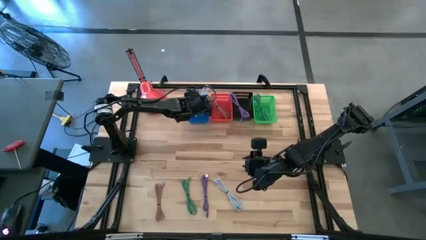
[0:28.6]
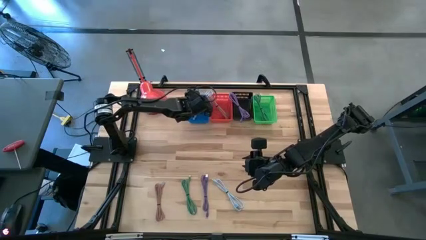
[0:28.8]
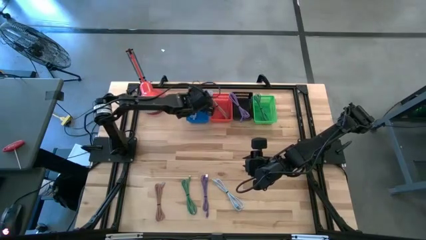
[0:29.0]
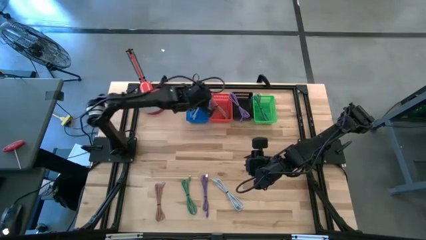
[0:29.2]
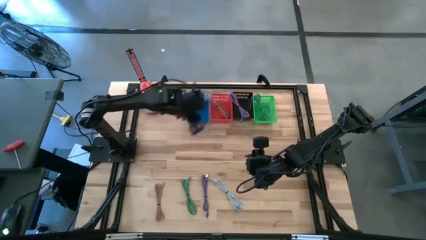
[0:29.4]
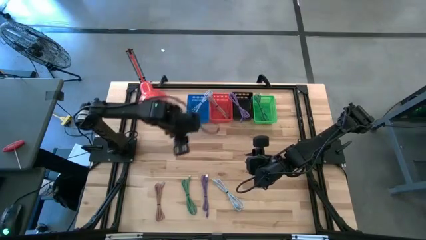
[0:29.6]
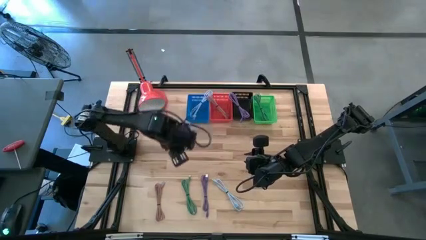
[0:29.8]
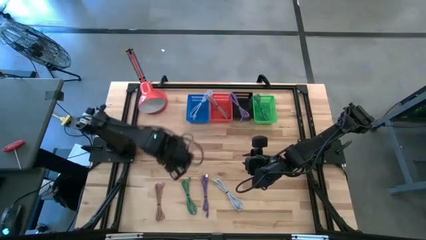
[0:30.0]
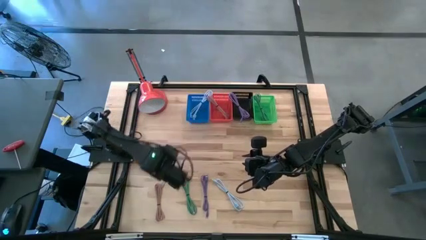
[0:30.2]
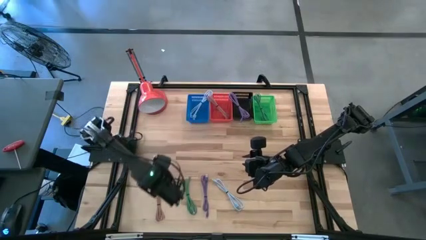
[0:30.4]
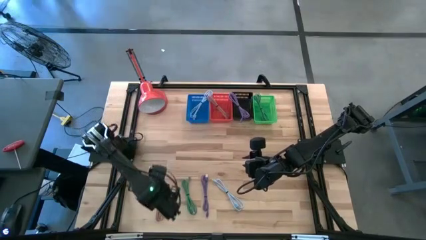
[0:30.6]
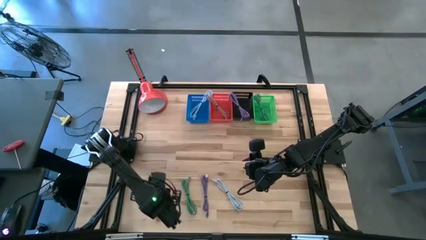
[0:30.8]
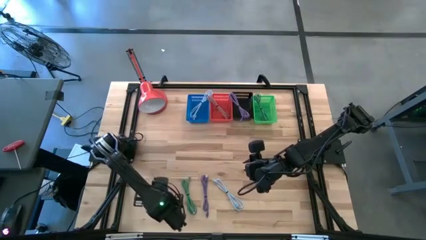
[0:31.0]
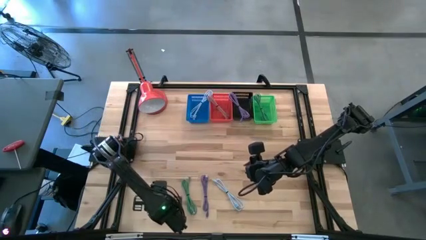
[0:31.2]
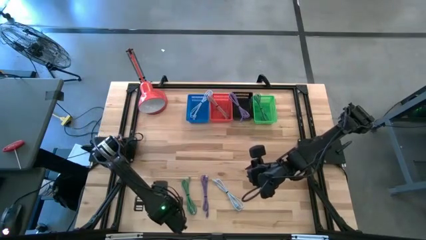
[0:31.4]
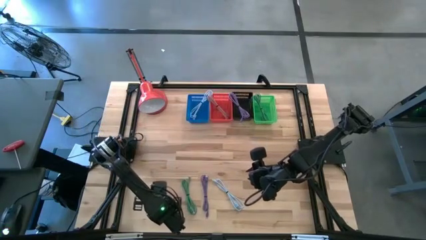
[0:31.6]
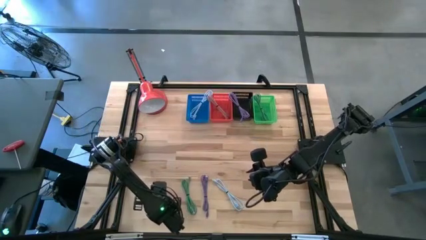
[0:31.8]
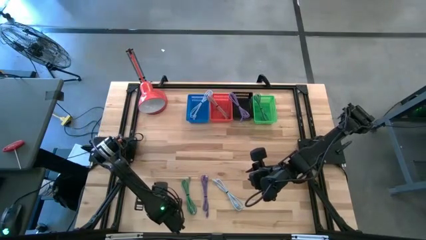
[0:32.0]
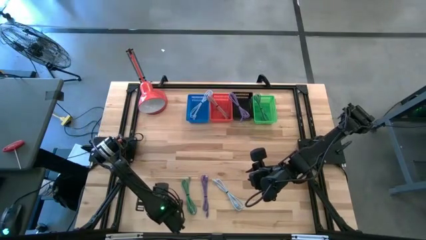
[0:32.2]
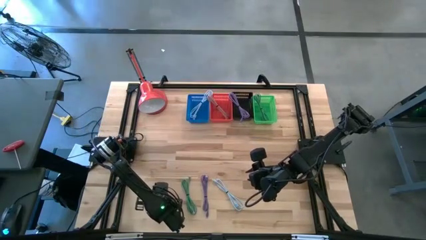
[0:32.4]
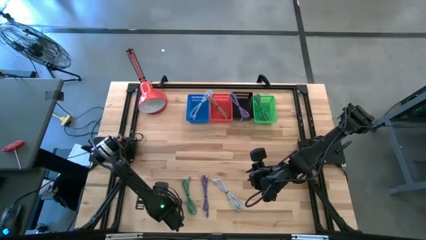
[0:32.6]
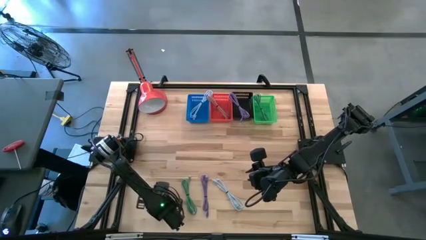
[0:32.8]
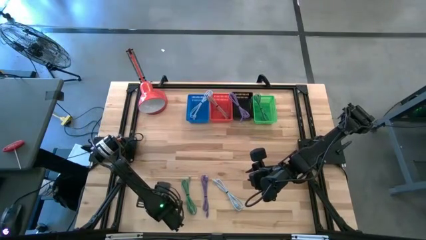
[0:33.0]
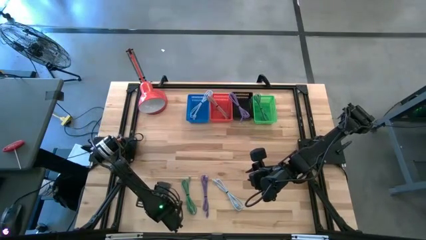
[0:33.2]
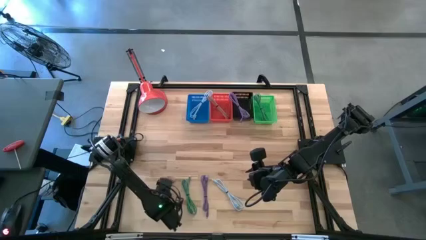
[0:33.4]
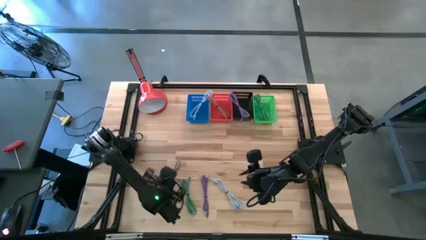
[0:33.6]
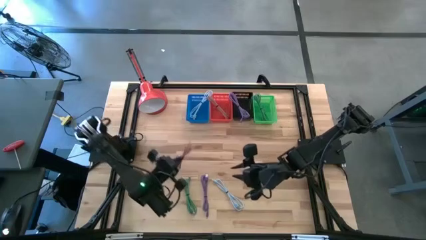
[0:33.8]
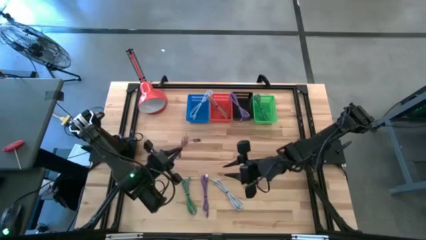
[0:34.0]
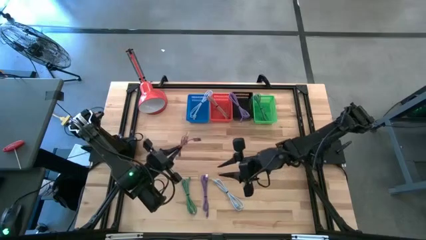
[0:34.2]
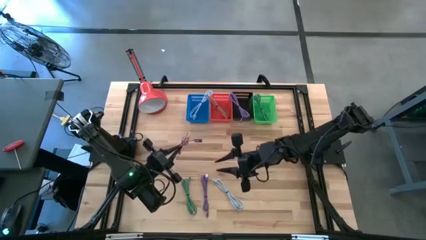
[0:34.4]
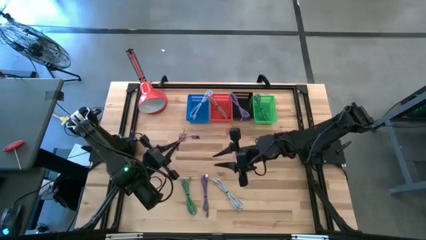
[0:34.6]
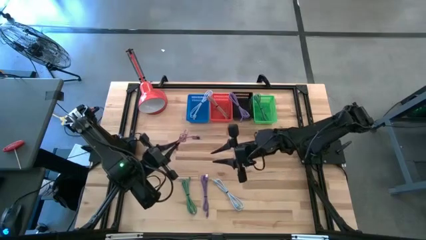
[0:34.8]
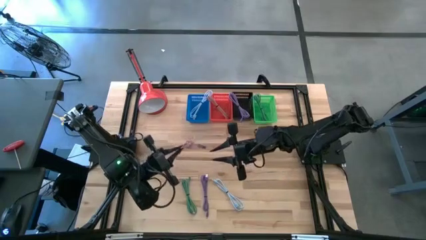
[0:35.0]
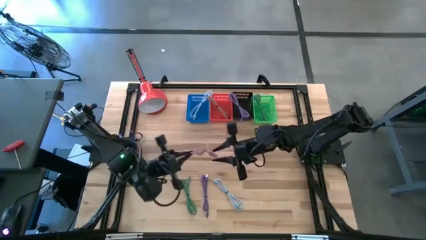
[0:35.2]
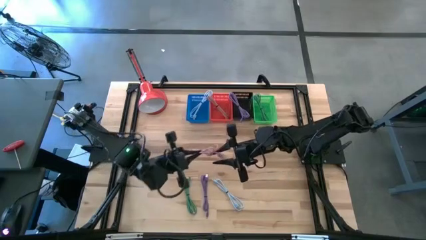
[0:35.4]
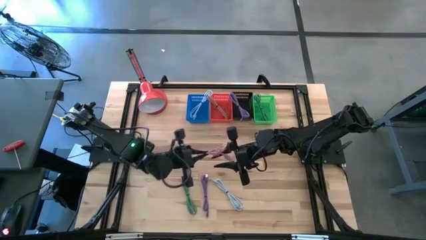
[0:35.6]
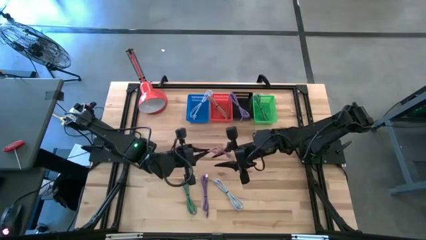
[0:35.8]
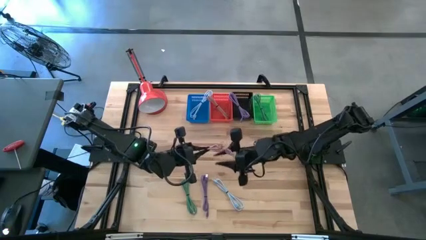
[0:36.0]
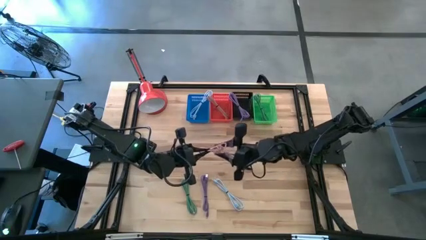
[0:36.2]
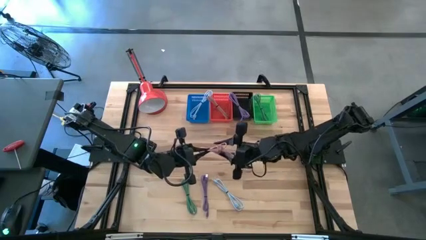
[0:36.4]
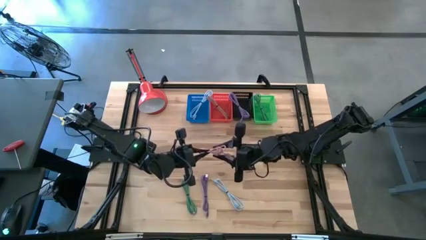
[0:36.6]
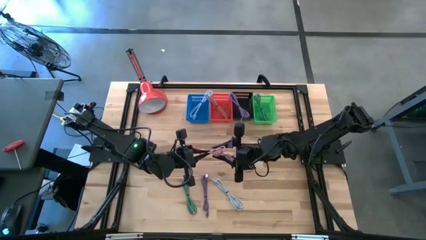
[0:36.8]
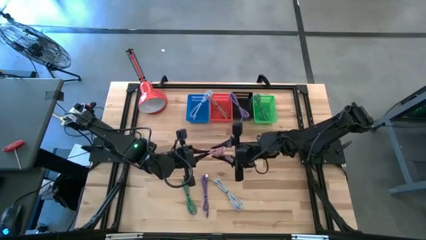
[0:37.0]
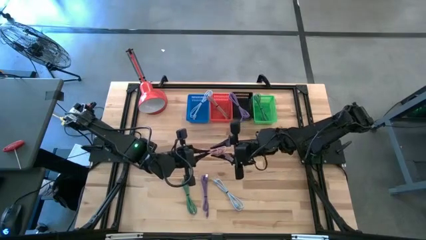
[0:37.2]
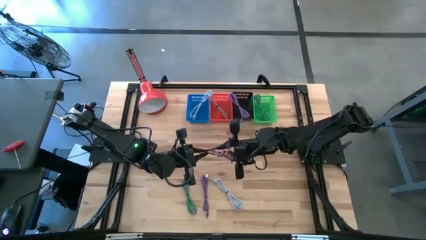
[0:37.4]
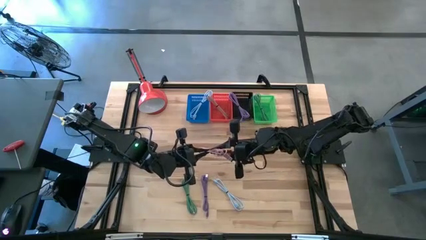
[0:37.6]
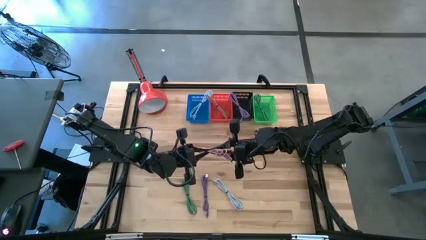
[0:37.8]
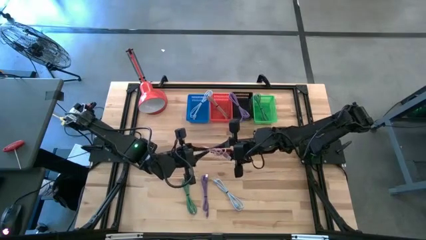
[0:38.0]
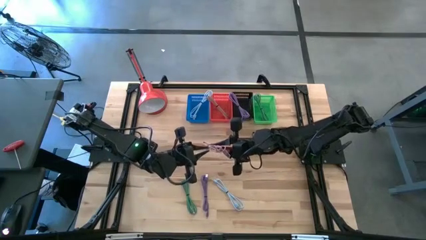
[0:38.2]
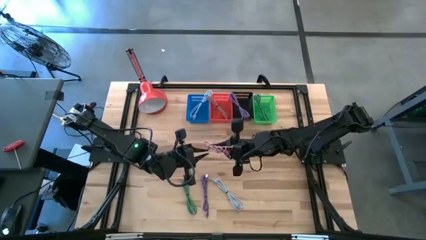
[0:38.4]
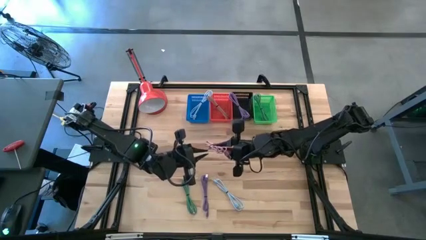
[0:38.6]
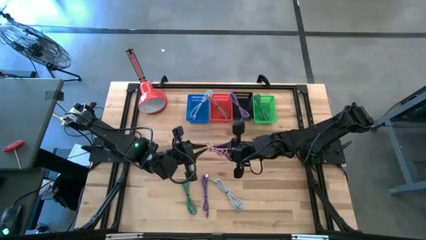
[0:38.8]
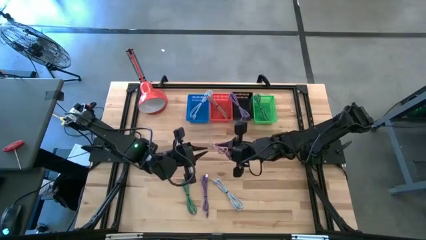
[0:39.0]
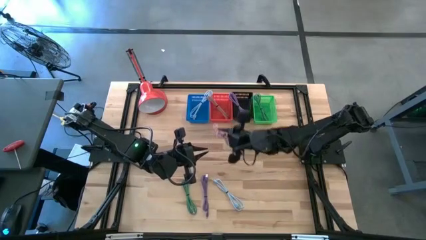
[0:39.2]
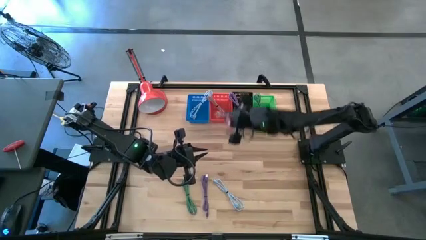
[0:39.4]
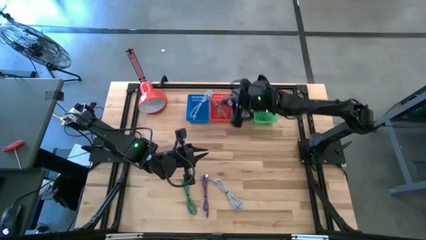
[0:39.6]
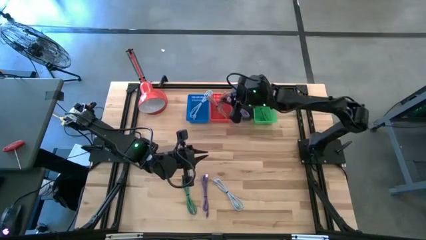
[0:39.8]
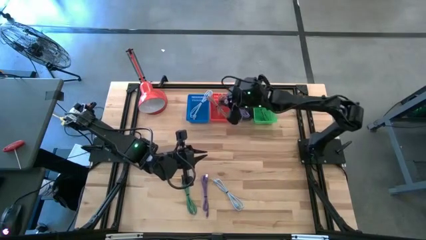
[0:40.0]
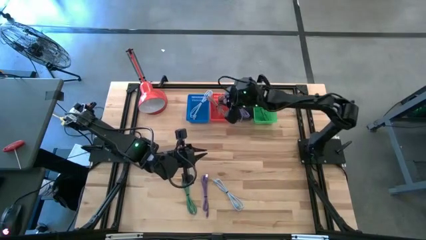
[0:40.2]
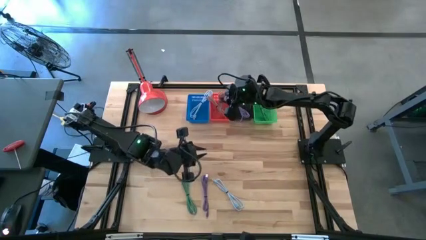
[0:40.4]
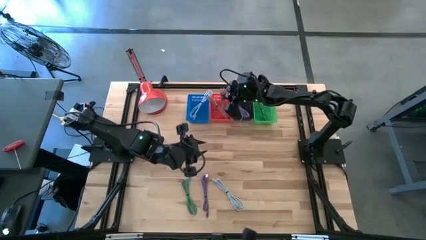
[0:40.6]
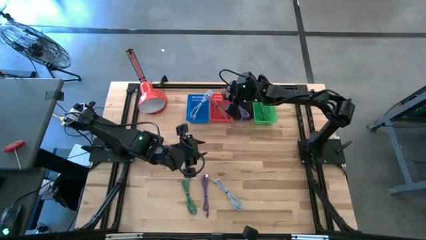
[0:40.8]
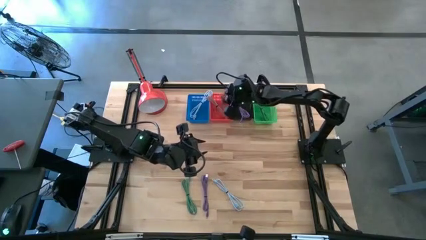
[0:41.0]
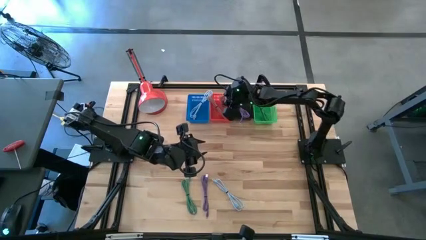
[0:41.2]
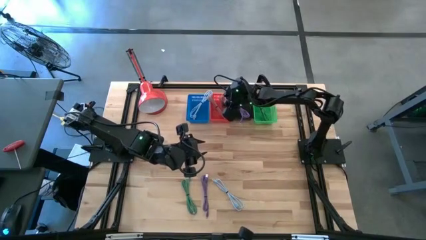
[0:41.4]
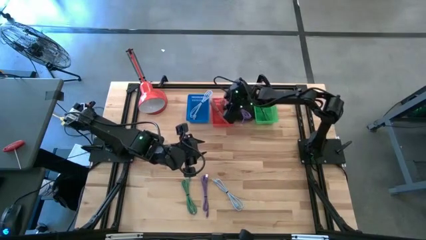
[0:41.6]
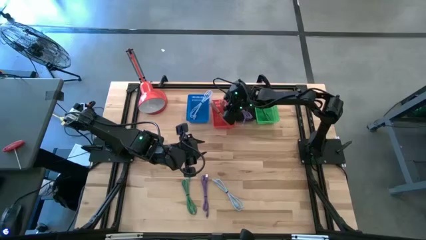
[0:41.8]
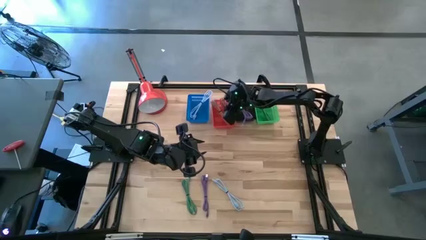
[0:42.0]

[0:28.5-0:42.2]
Task: Pick & Place USB Port
Put the pink charger cable into the orange bin
